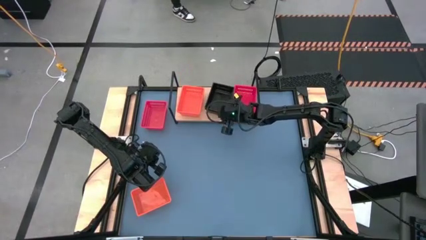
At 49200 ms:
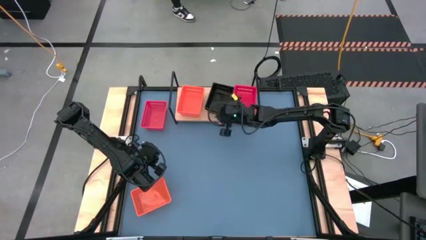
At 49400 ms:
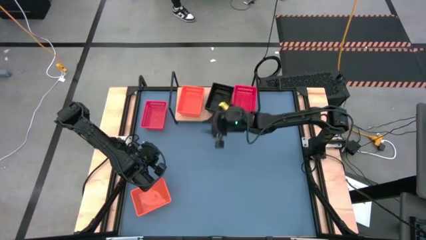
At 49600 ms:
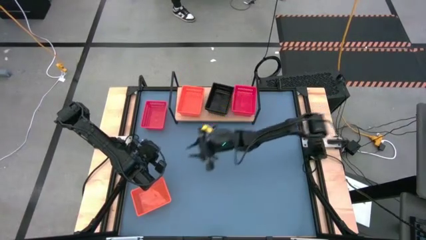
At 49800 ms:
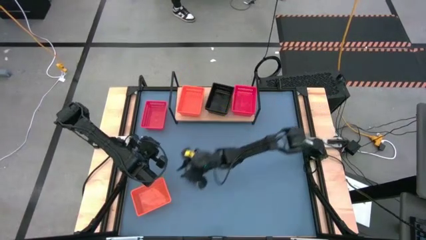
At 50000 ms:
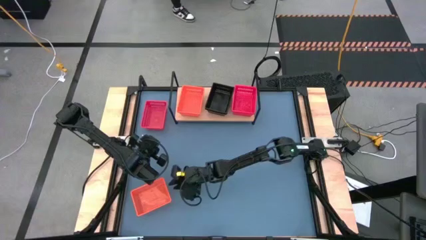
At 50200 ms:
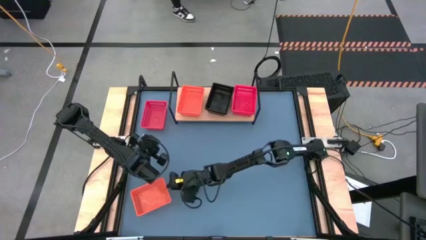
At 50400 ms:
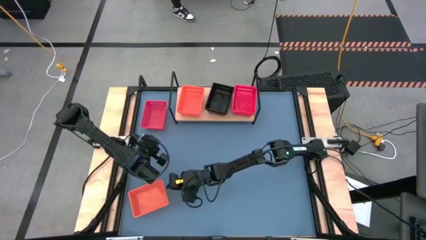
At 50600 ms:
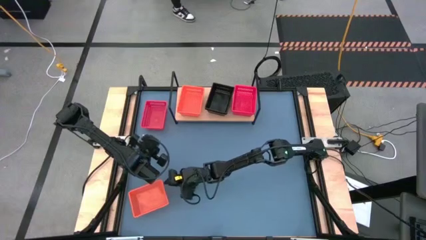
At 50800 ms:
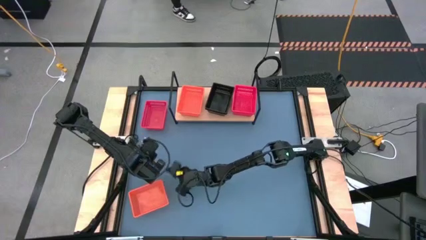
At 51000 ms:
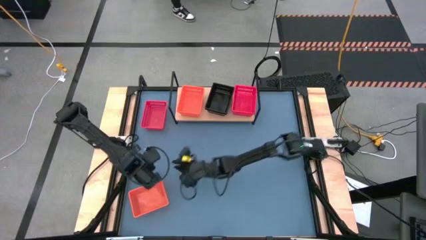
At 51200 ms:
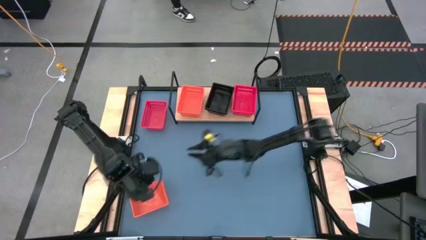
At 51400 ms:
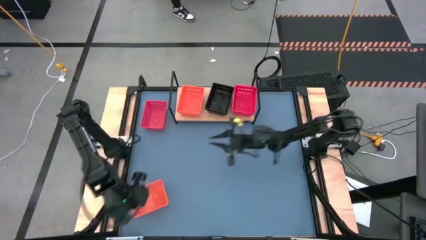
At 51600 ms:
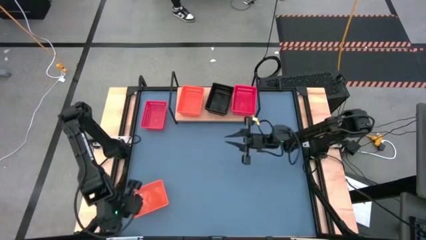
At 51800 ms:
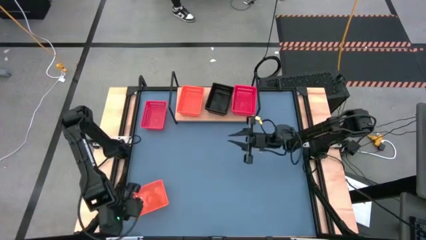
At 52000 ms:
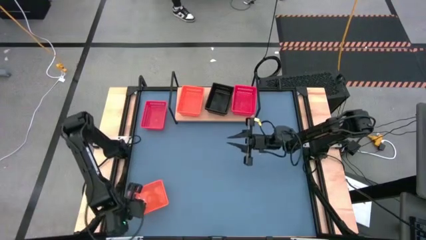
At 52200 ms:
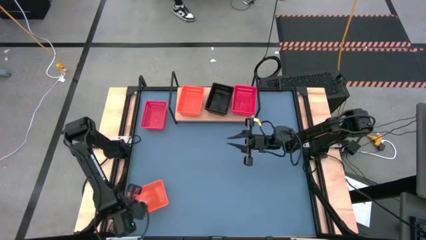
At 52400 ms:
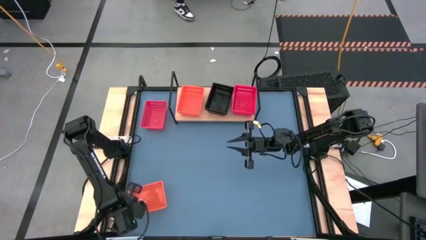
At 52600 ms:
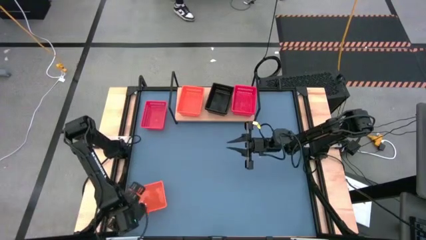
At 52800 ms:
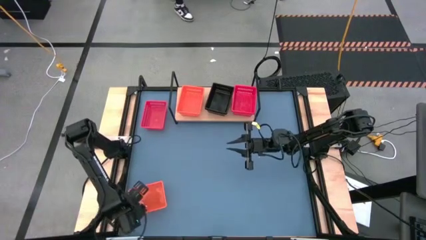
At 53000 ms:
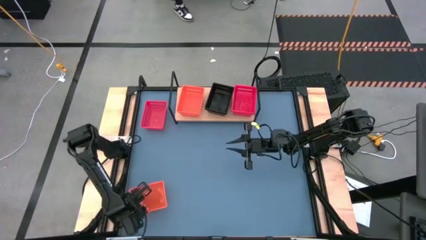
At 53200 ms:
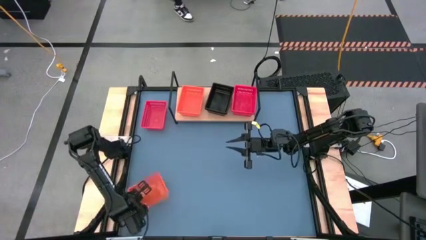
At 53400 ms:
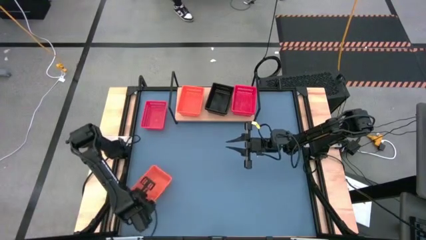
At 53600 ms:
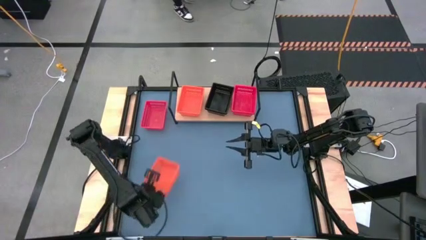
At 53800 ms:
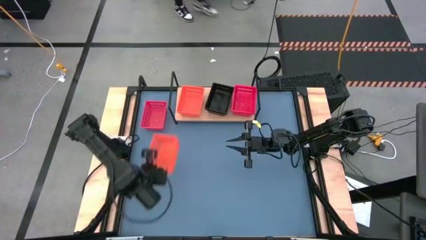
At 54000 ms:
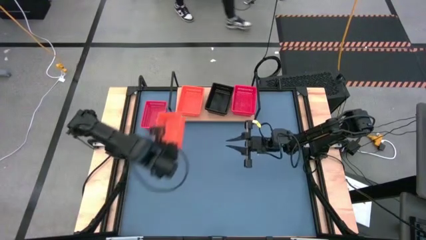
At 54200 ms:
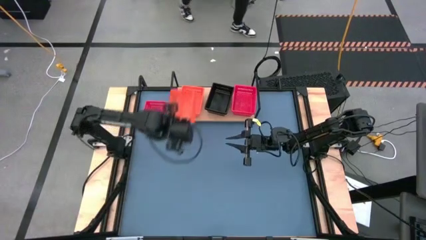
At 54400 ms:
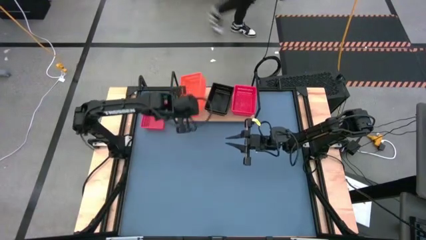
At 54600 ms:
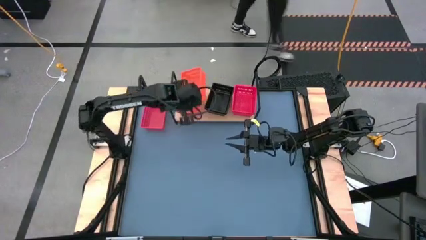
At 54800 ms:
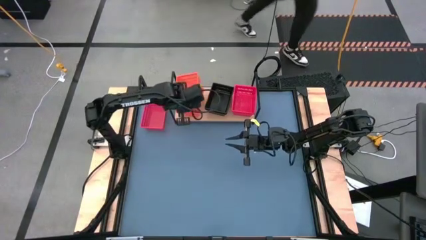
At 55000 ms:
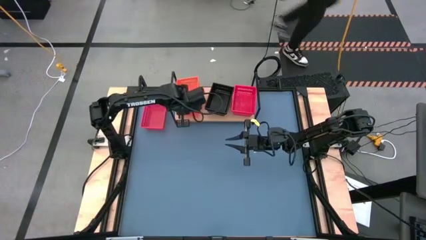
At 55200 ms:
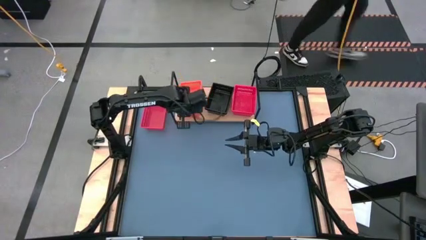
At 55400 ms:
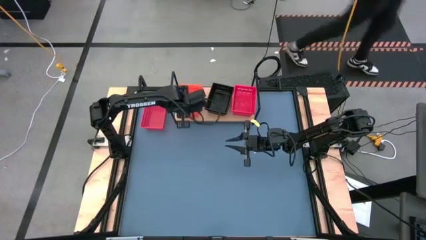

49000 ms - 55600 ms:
Task: Stack baskets on shelf by color
Stack the orange bin on top of the orange bin on the shelf

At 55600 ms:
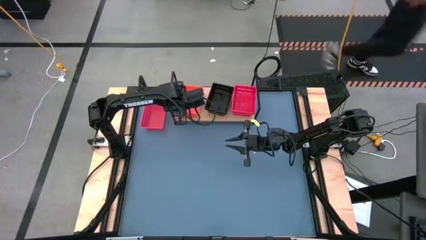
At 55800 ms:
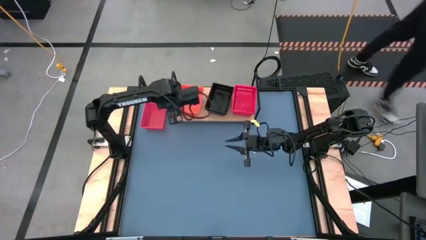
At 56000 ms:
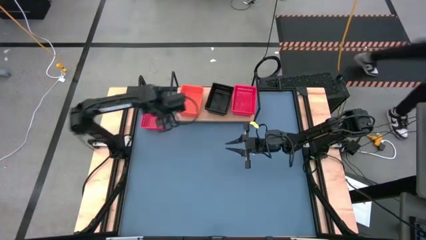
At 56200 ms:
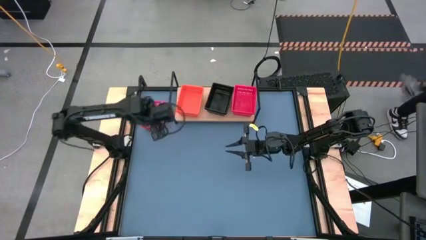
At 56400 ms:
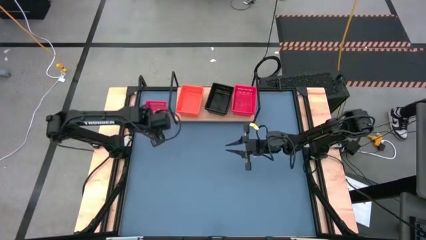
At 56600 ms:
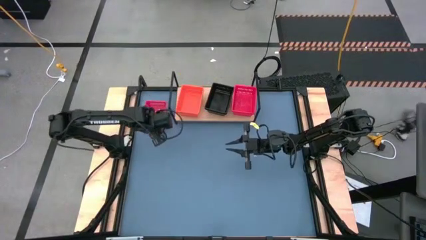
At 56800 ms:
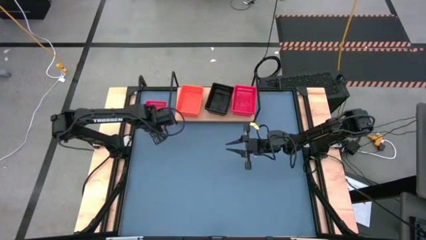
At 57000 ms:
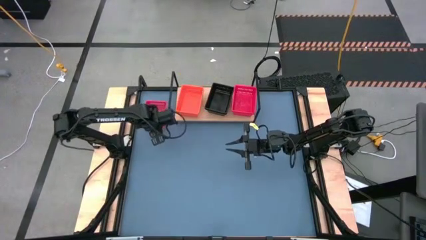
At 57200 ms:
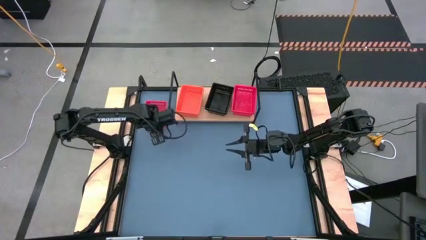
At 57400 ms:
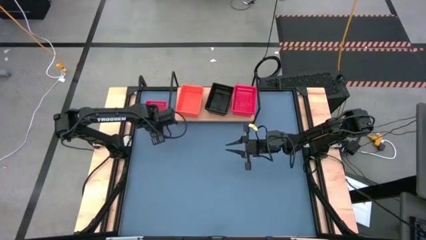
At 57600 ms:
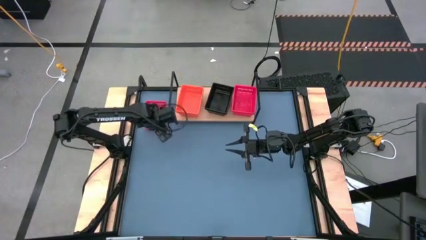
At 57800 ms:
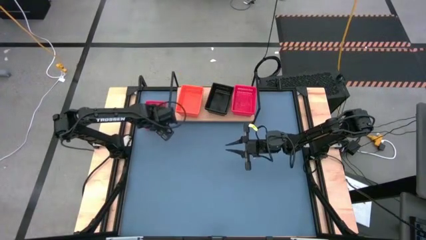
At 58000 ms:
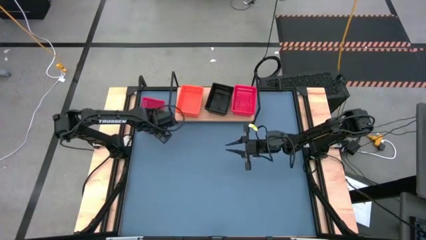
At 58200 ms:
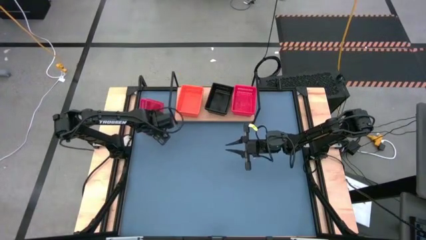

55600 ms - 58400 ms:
Stack the red bin on top of the red bin on the shelf

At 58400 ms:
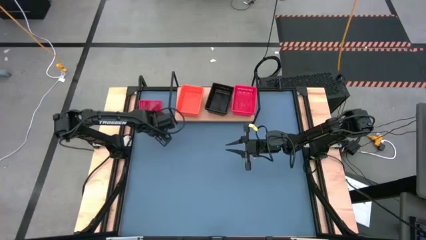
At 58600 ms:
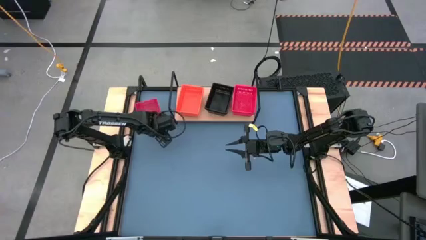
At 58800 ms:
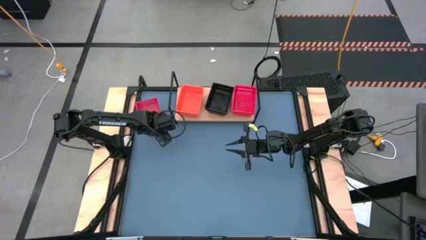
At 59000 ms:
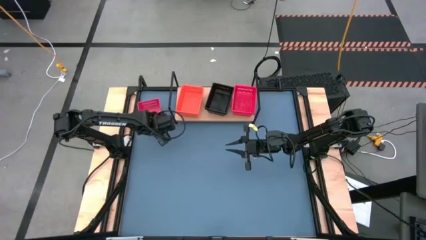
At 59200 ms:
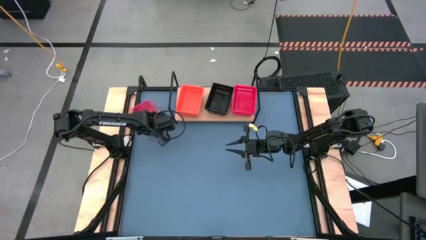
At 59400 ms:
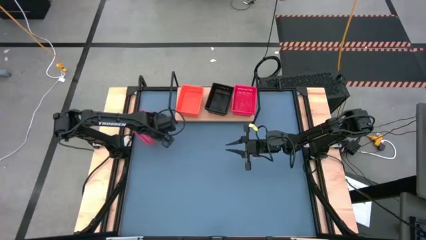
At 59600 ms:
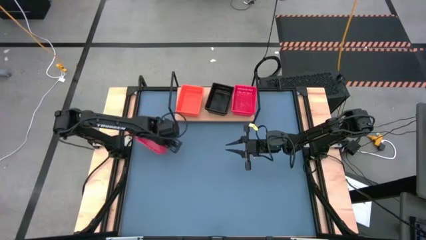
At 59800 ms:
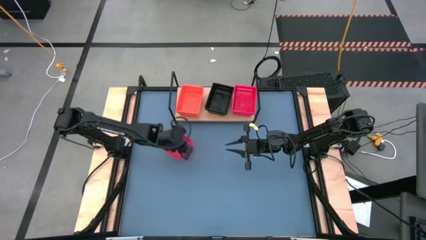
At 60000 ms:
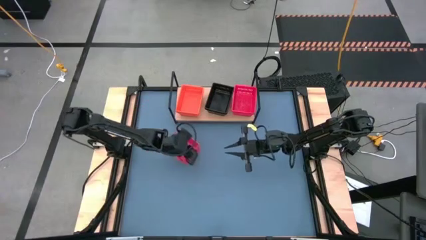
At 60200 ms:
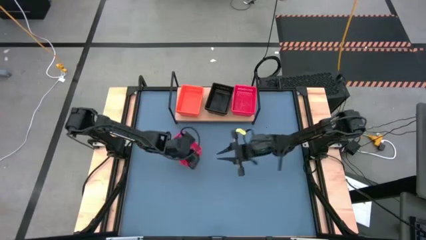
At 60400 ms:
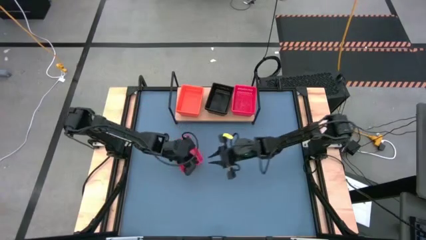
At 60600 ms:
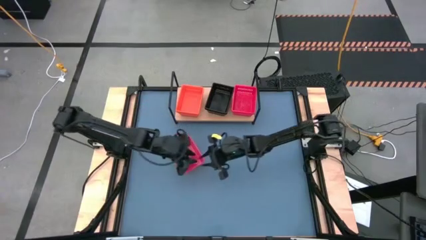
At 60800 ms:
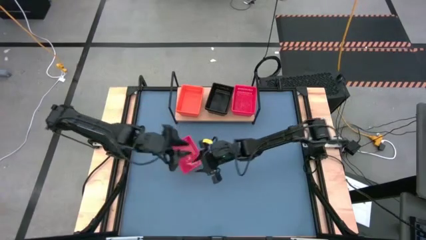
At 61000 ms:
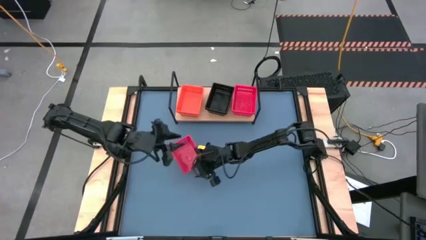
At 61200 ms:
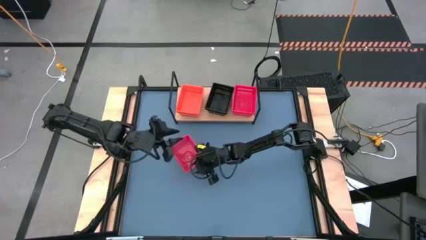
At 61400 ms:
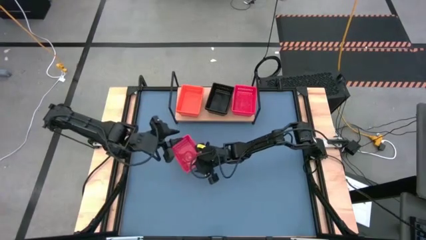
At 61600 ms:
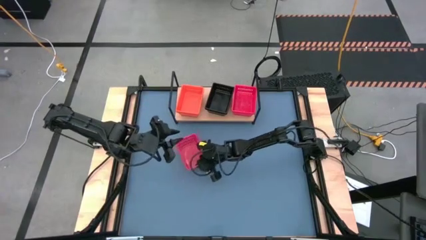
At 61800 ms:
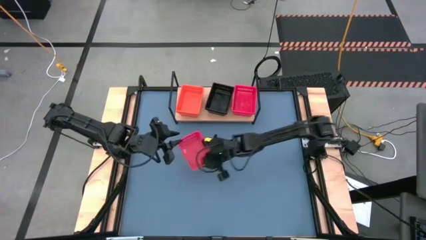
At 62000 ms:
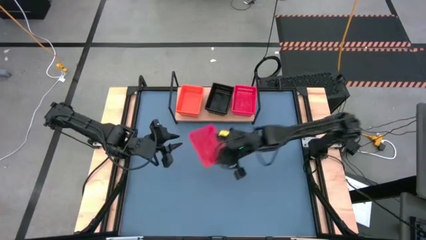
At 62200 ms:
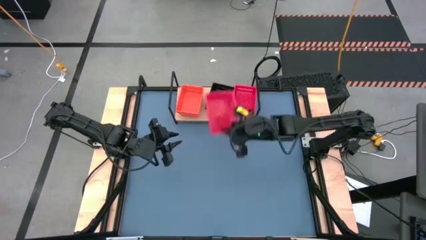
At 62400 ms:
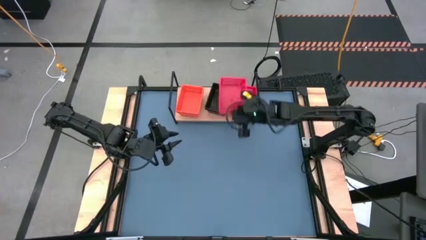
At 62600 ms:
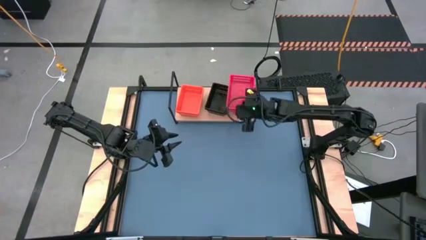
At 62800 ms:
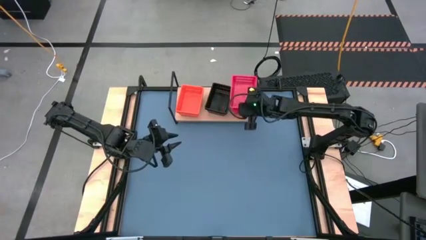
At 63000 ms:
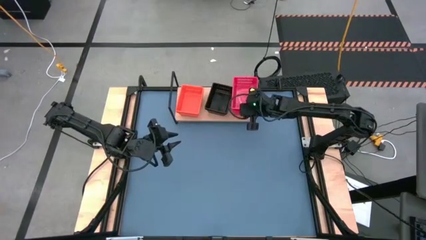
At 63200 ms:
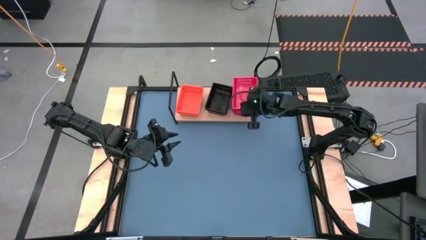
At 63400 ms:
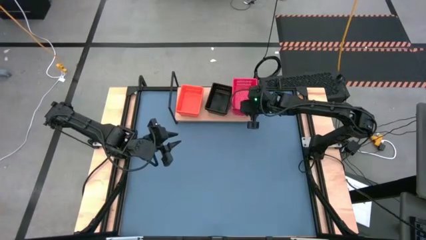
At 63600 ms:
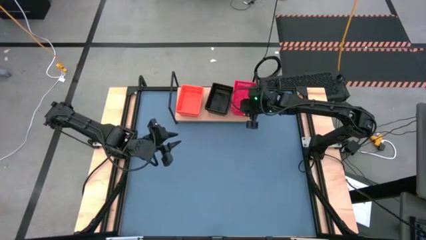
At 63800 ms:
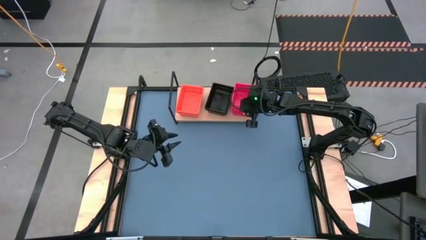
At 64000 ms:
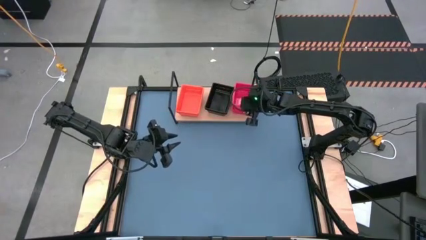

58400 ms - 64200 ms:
Stack the red bin on top of the red bin on the shelf

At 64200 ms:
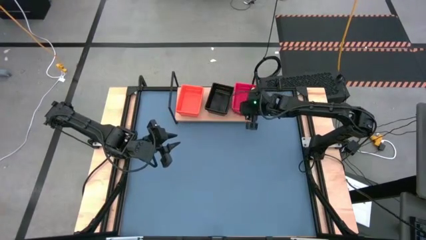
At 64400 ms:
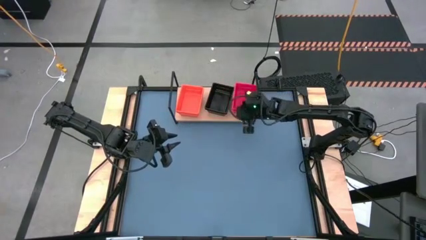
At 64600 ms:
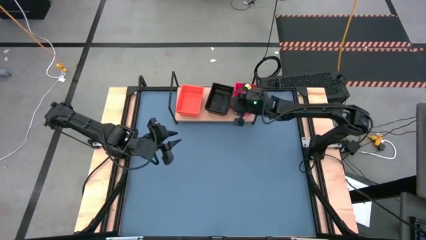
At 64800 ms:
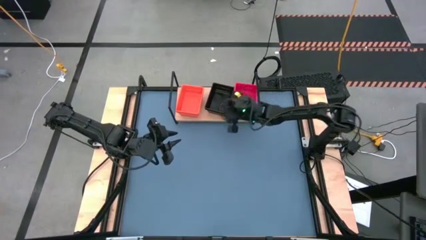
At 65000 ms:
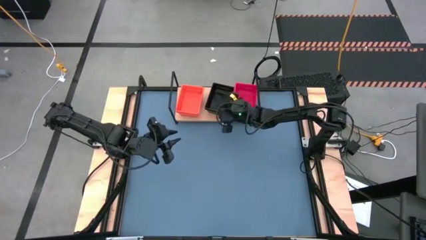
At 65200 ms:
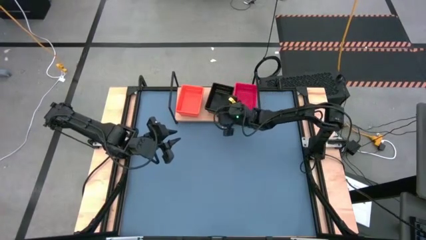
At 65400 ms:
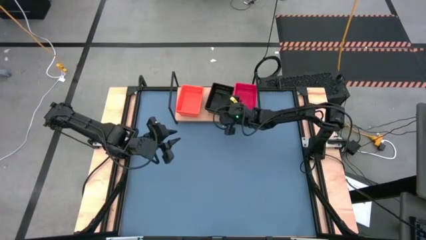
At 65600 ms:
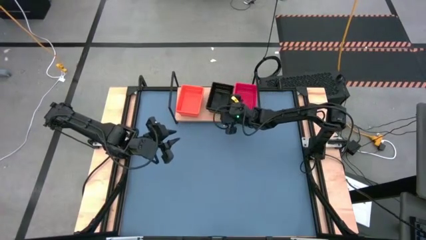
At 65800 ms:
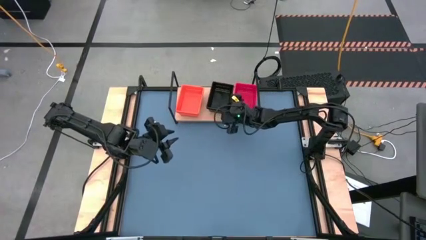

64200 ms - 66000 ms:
Adjust the stacked black bins on the shelf
